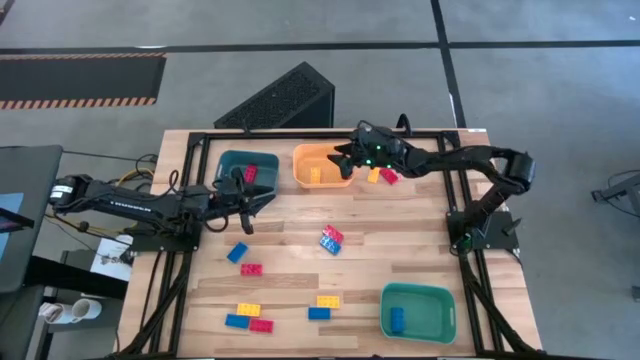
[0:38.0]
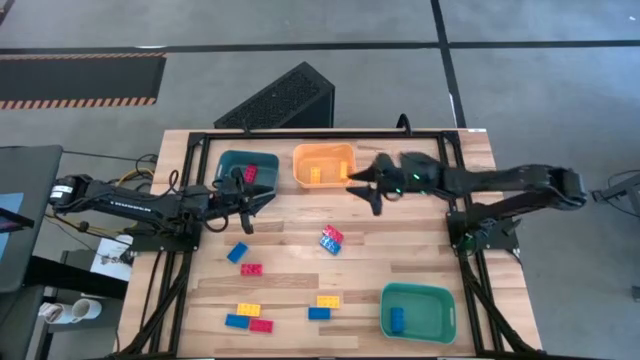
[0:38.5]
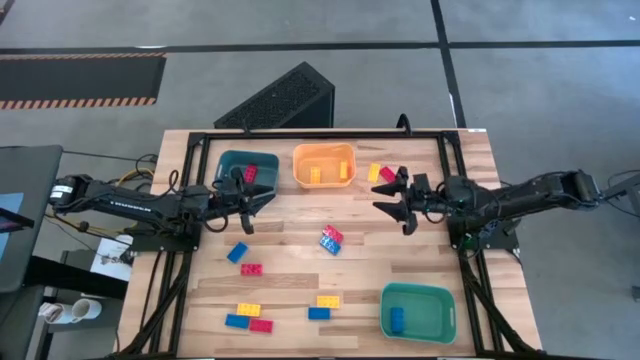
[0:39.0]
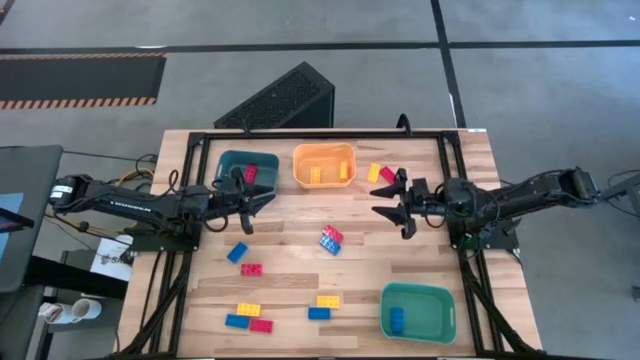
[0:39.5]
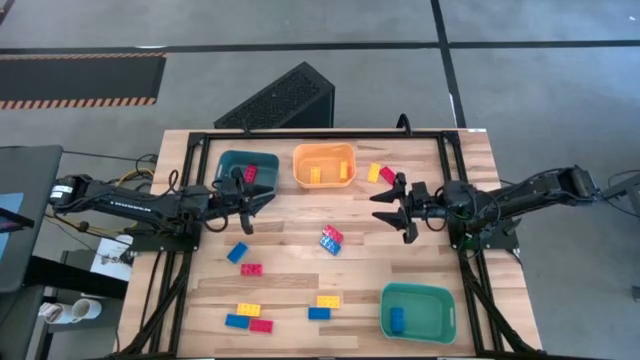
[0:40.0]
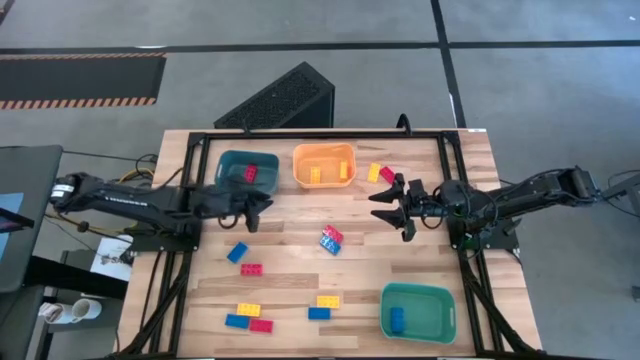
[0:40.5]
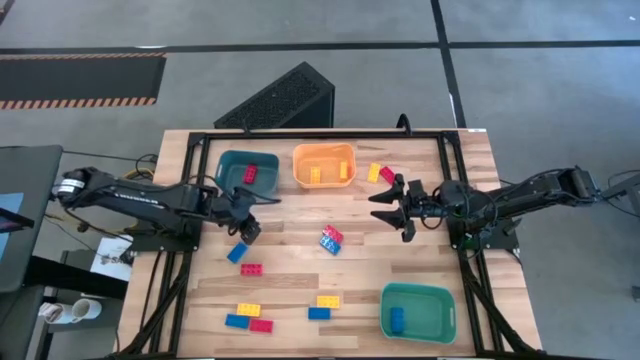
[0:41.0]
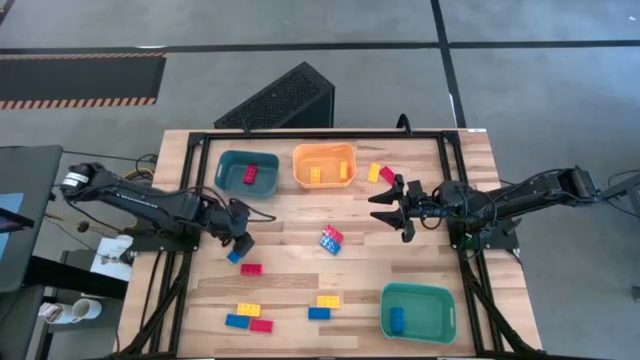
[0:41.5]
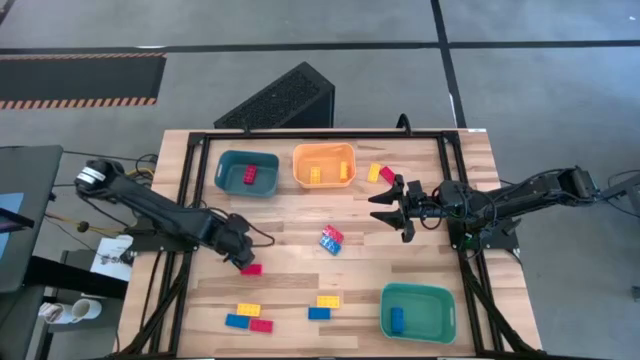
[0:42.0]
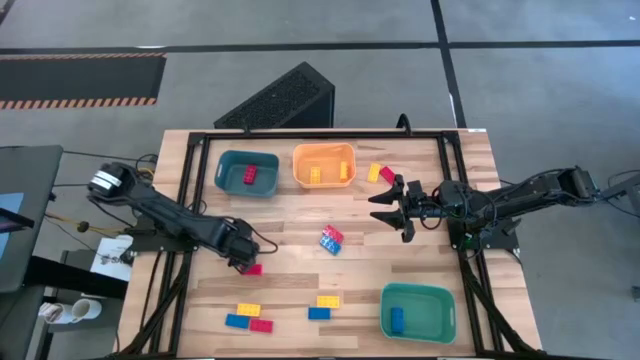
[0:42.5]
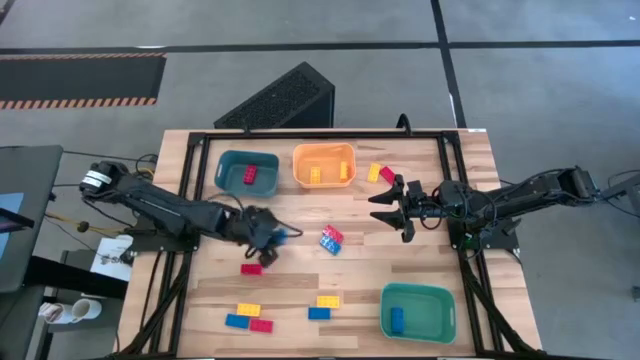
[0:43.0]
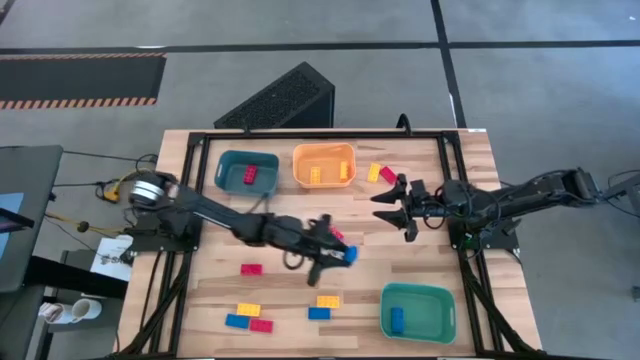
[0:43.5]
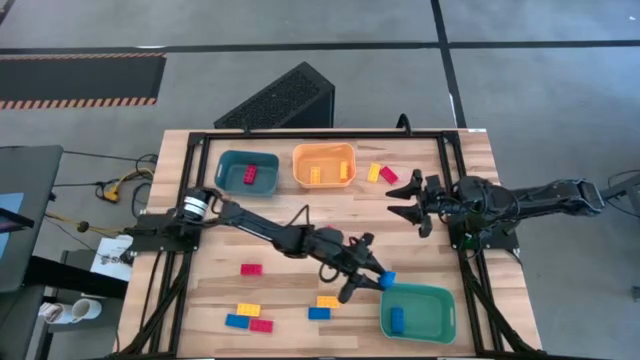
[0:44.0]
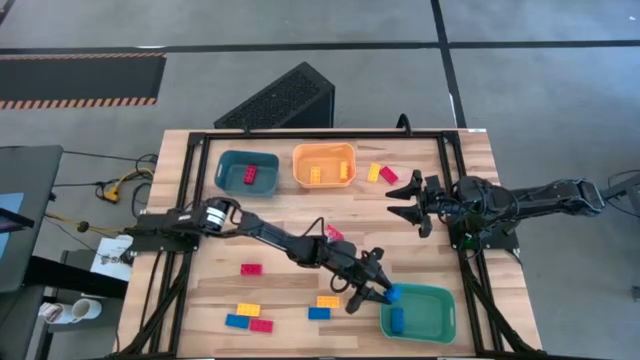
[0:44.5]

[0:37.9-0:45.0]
Task: Sort & place blocks by color
Put the blue game piece into the green bin

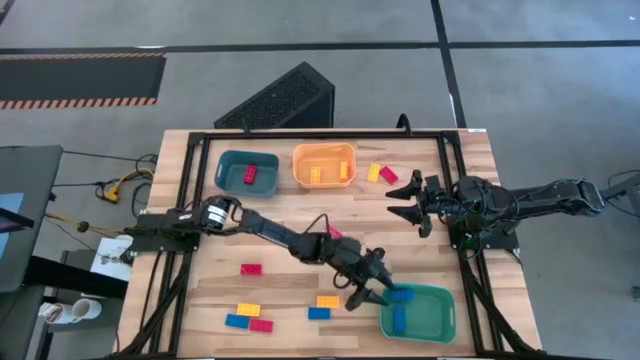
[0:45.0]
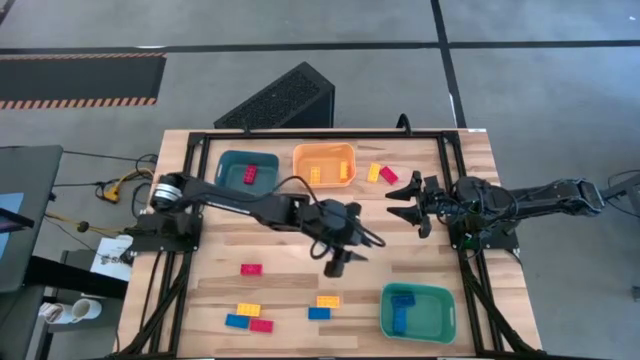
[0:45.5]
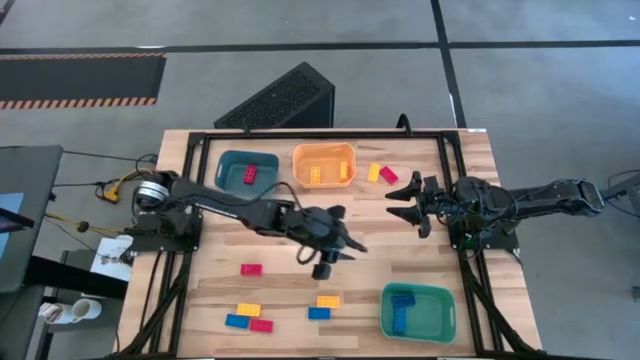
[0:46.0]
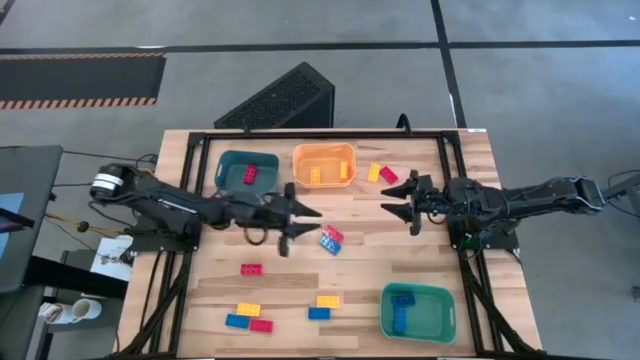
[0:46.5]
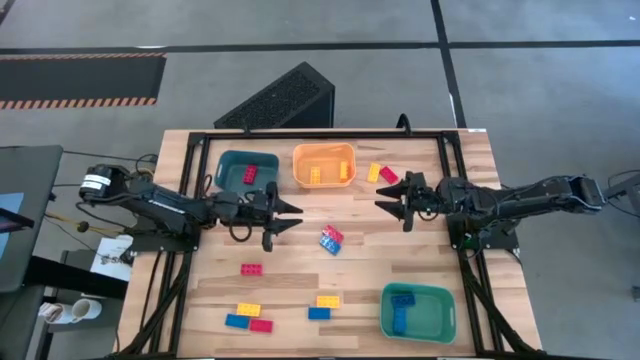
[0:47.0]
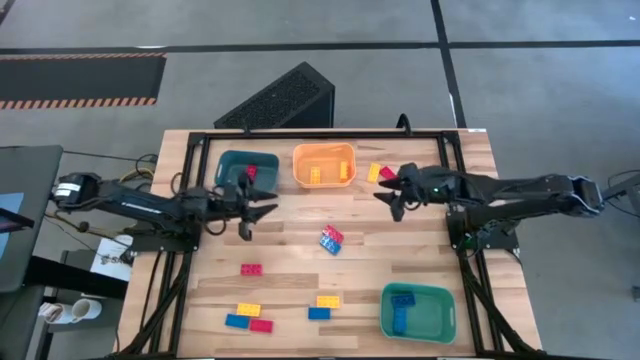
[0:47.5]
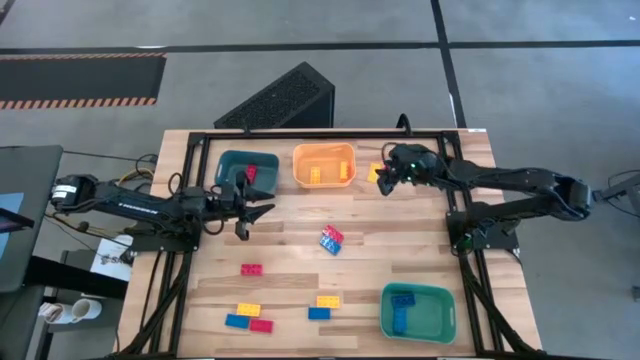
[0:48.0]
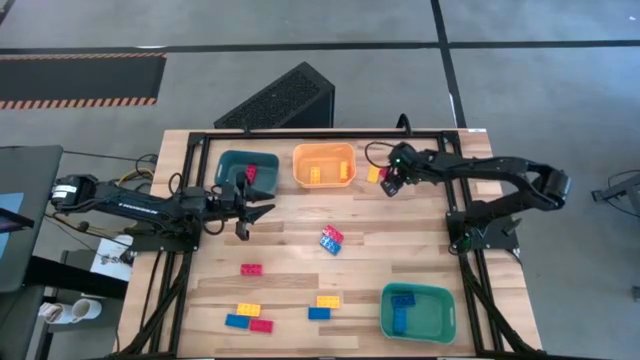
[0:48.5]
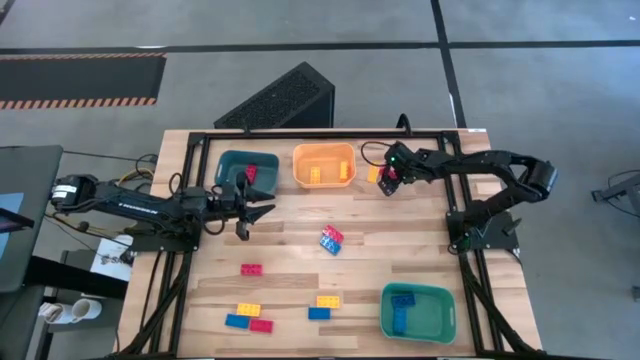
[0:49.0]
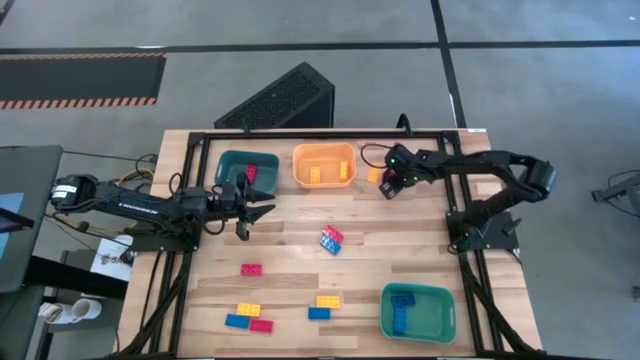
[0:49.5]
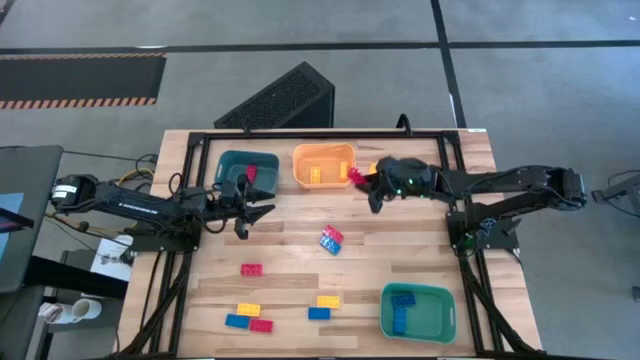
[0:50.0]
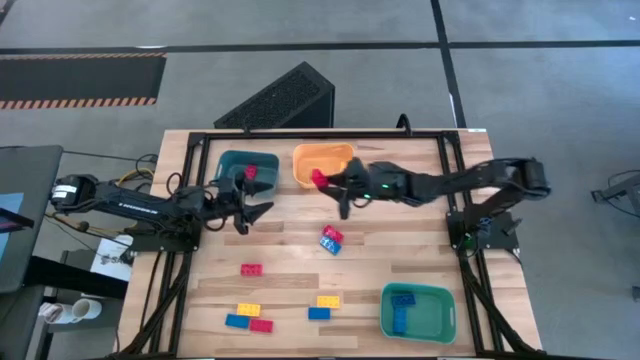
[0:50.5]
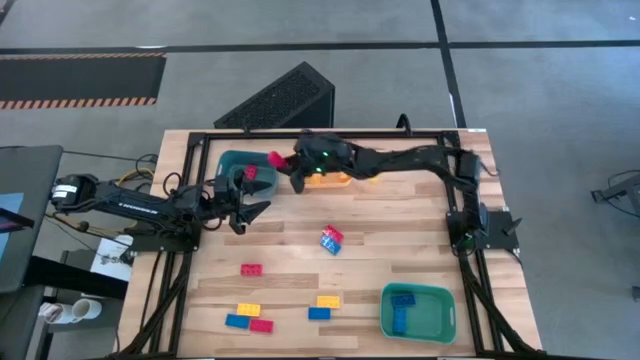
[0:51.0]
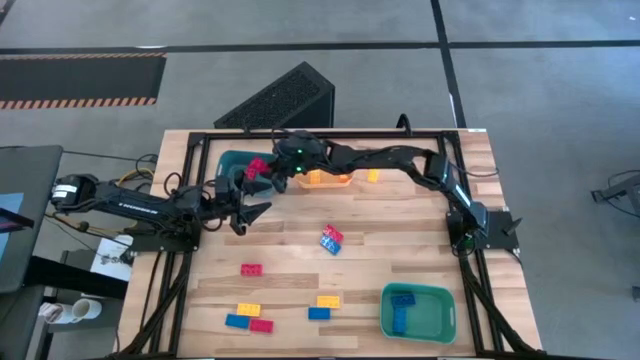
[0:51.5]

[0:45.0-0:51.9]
Put the red game piece into the blue bin

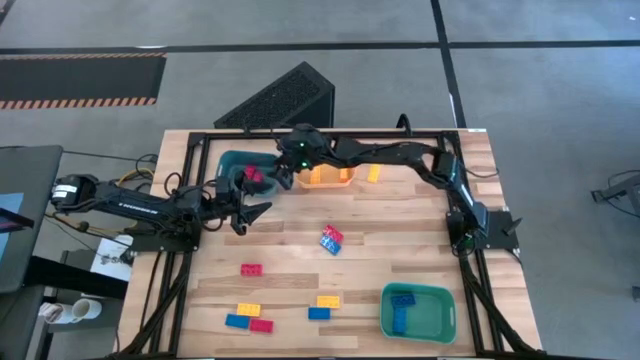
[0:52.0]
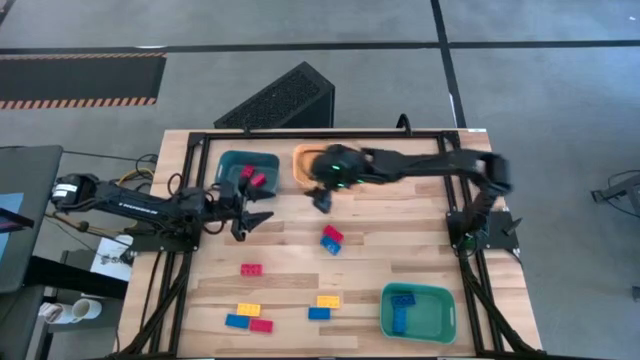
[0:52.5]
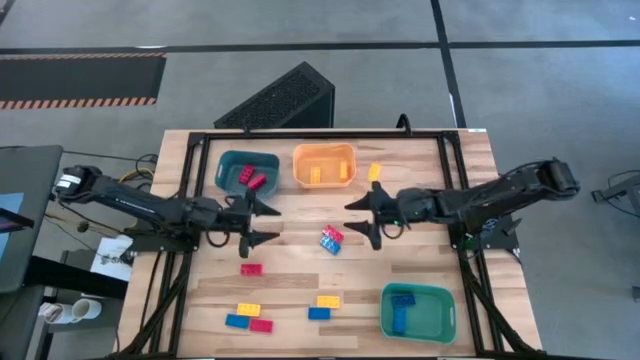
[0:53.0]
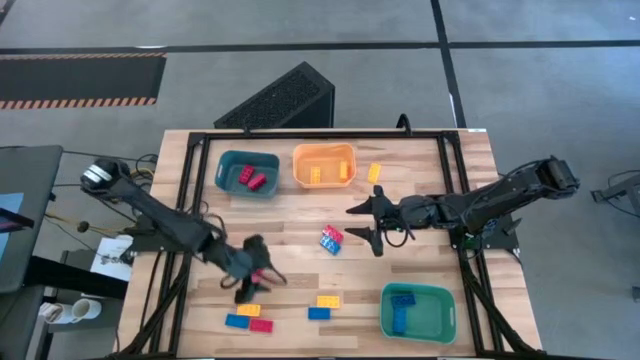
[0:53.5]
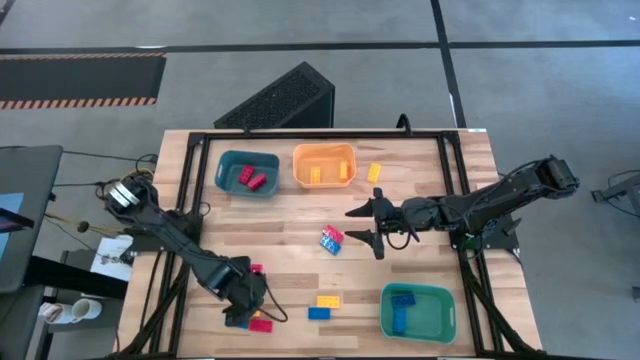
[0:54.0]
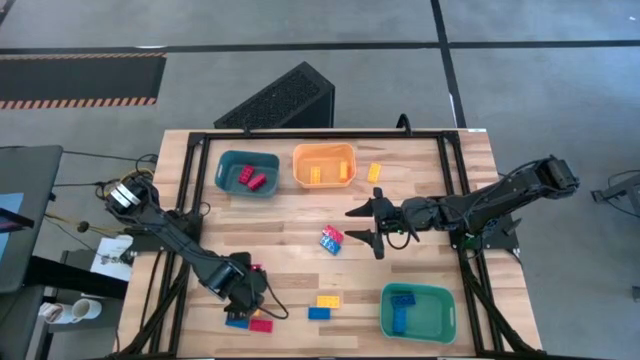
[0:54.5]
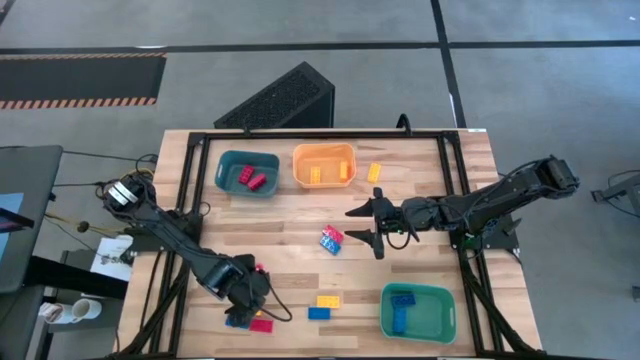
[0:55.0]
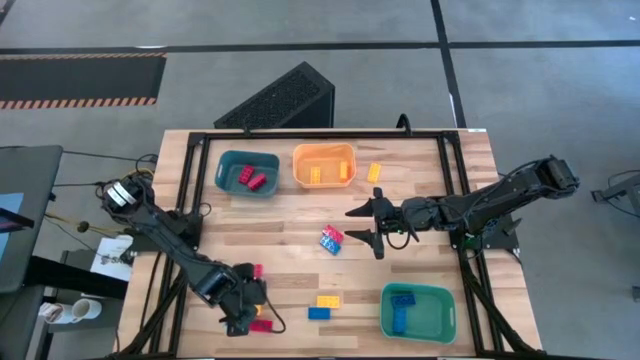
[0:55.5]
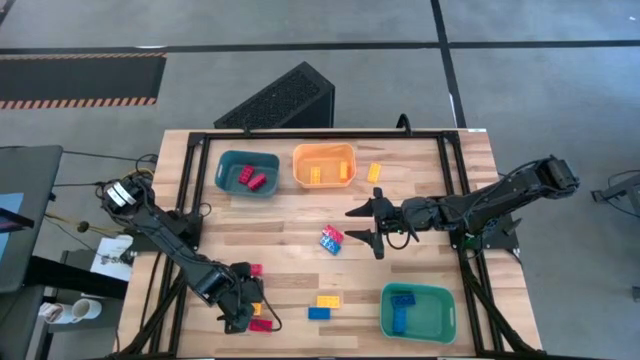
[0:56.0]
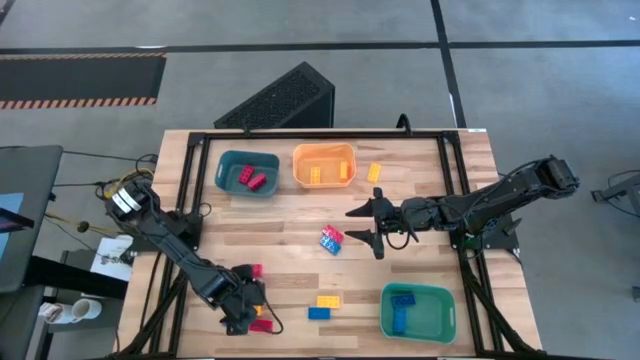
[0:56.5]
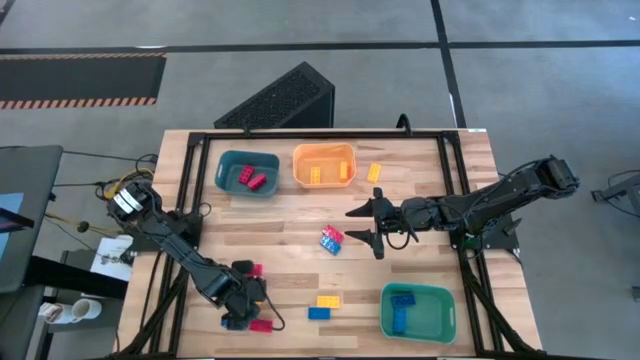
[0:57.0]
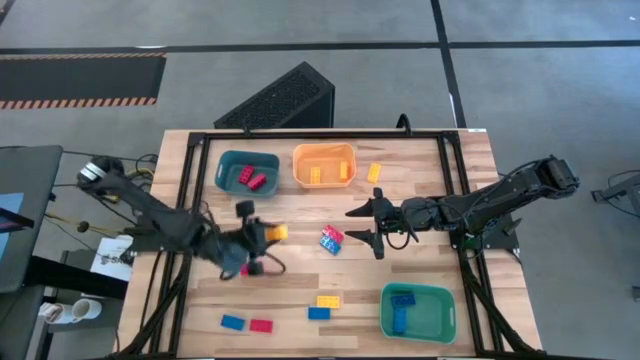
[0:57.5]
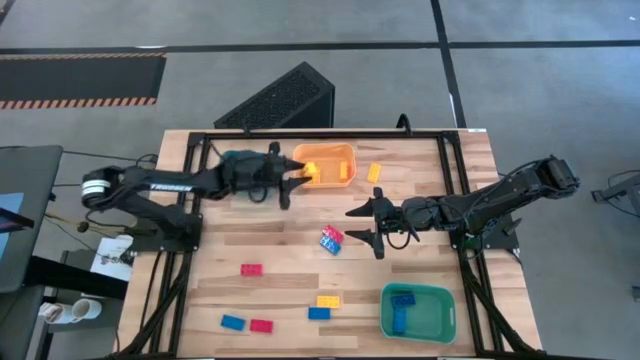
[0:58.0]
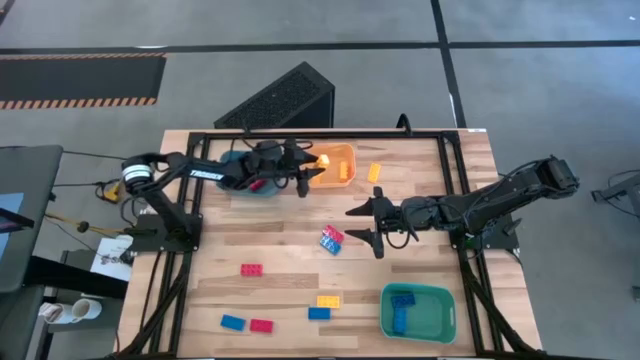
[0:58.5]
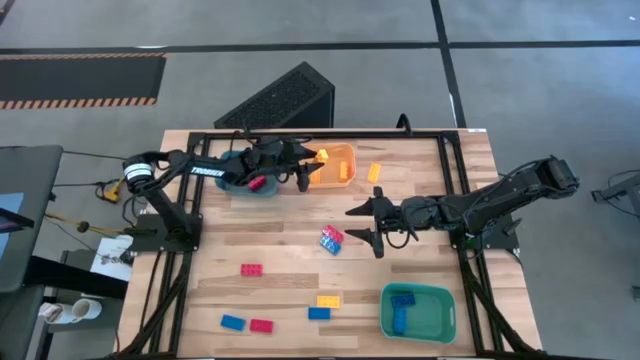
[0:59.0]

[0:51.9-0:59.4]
Put the yellow game piece into the yellow bin
